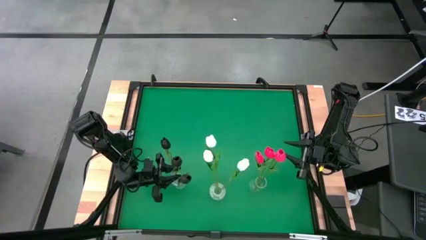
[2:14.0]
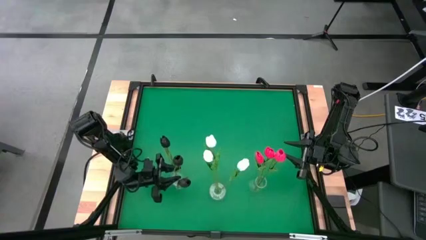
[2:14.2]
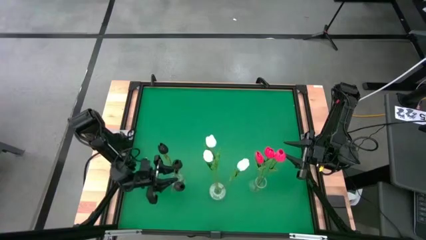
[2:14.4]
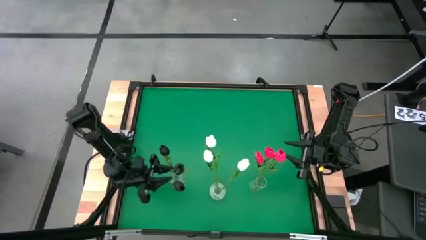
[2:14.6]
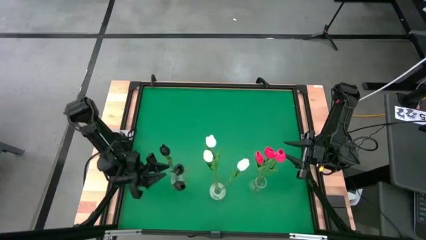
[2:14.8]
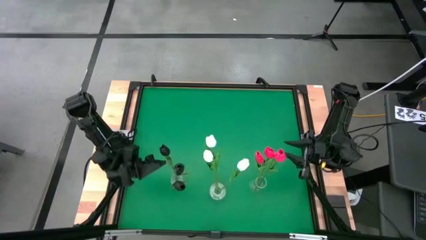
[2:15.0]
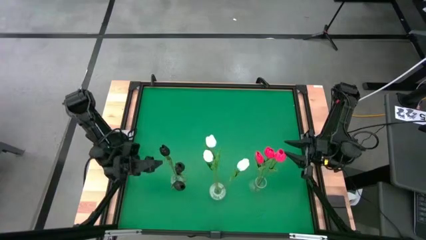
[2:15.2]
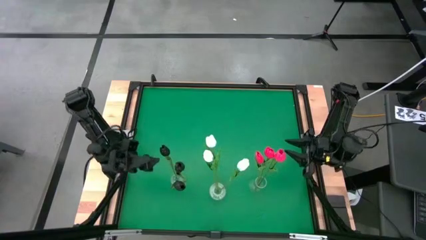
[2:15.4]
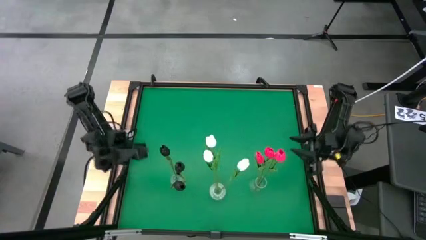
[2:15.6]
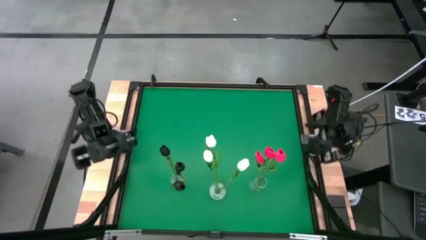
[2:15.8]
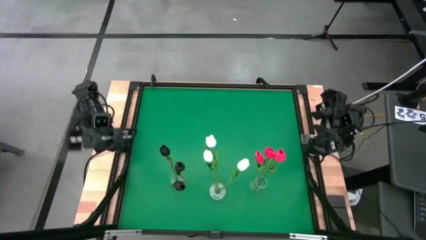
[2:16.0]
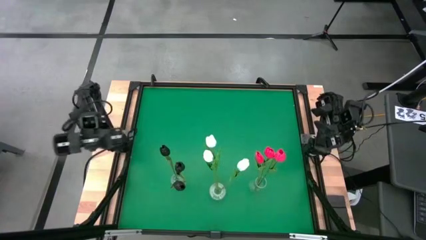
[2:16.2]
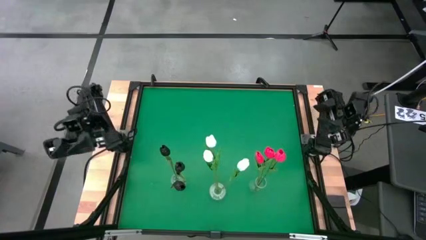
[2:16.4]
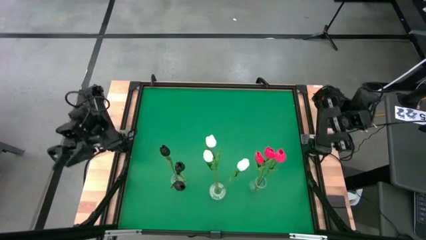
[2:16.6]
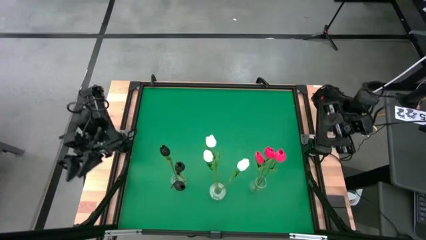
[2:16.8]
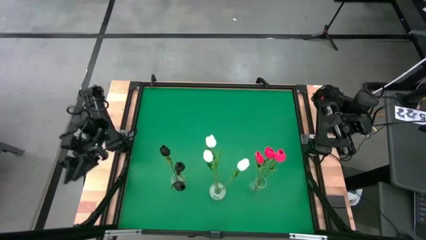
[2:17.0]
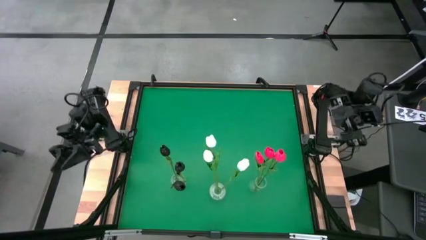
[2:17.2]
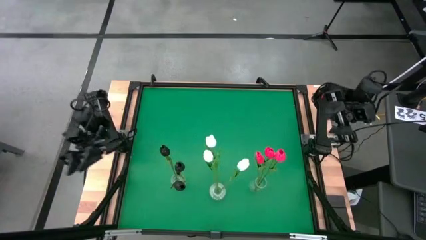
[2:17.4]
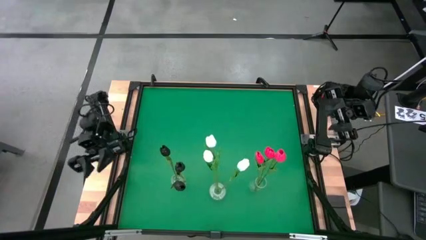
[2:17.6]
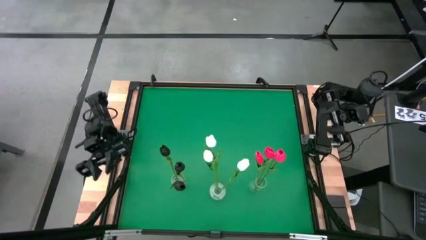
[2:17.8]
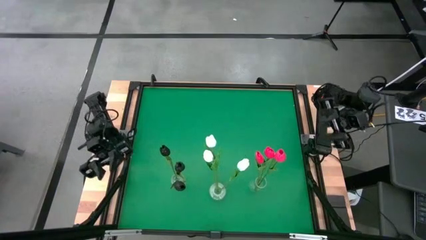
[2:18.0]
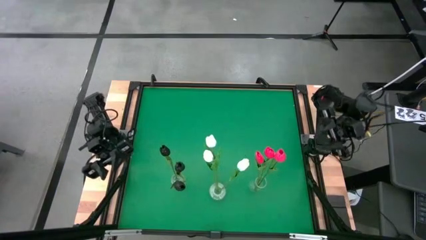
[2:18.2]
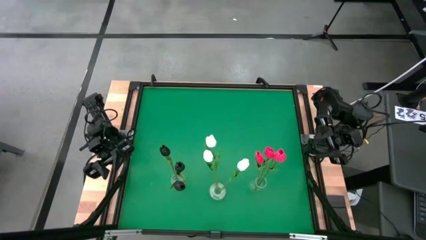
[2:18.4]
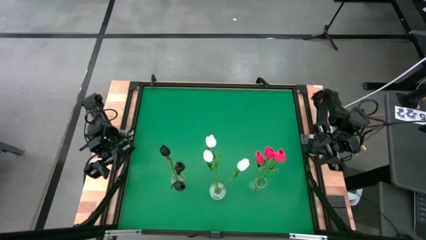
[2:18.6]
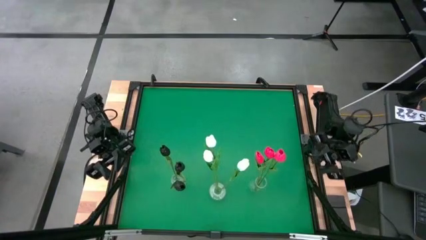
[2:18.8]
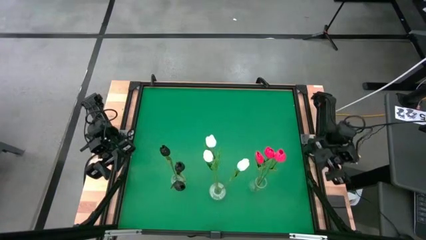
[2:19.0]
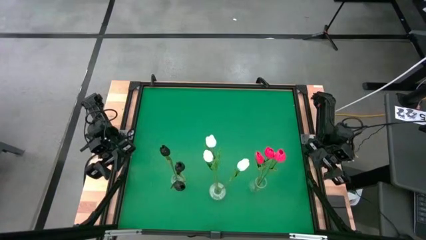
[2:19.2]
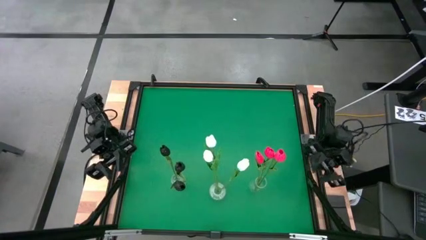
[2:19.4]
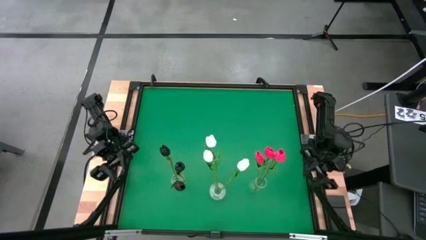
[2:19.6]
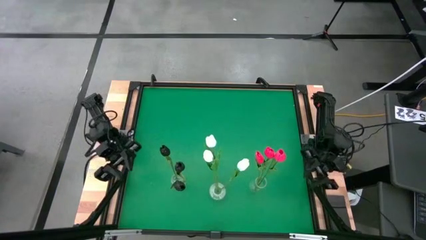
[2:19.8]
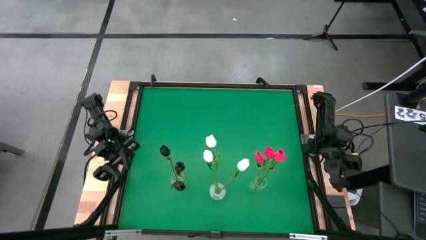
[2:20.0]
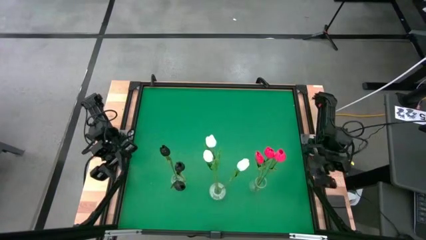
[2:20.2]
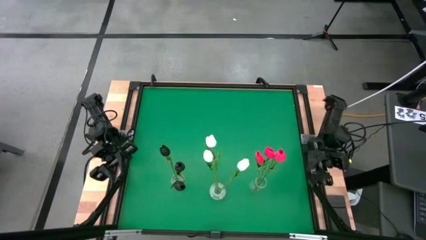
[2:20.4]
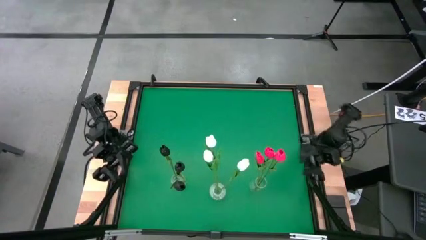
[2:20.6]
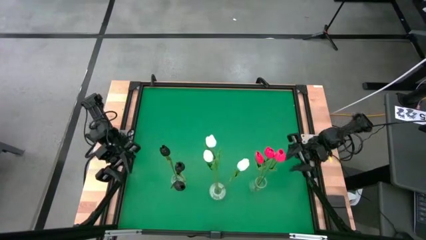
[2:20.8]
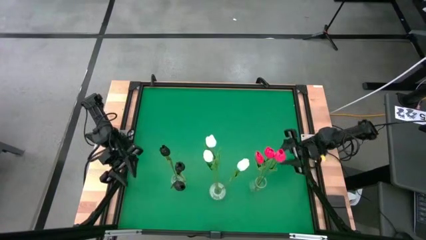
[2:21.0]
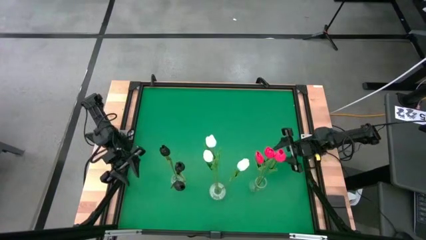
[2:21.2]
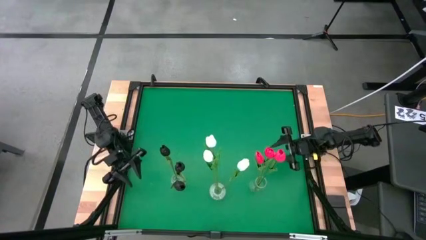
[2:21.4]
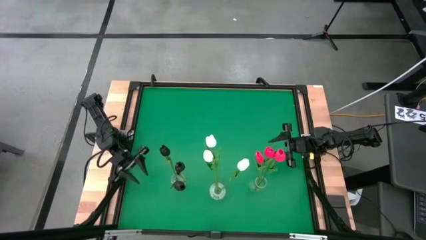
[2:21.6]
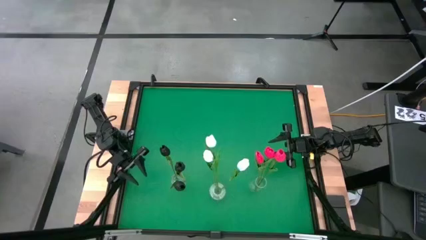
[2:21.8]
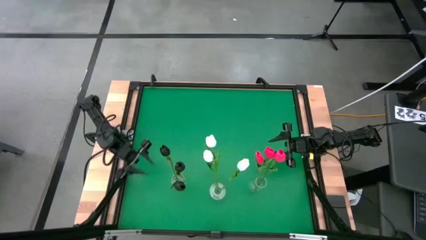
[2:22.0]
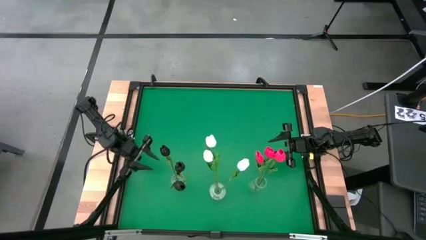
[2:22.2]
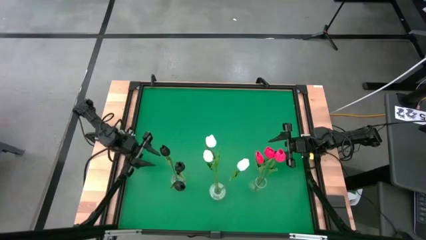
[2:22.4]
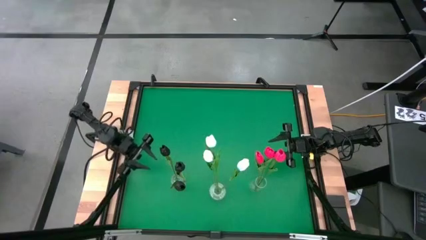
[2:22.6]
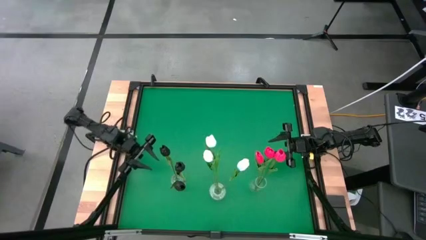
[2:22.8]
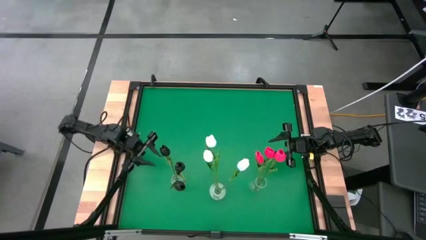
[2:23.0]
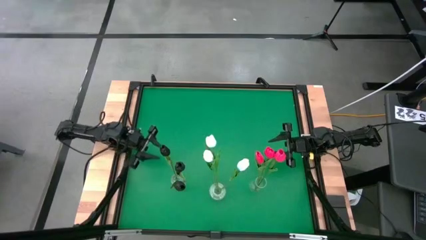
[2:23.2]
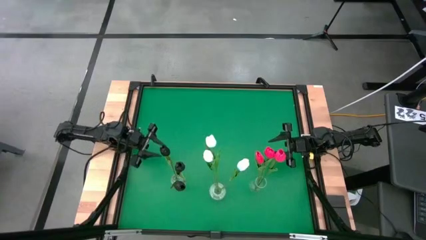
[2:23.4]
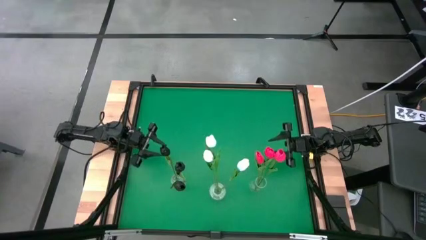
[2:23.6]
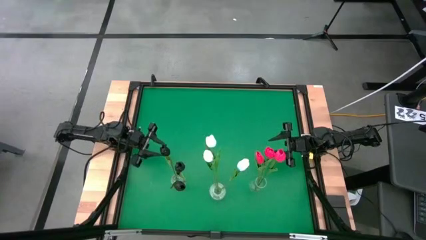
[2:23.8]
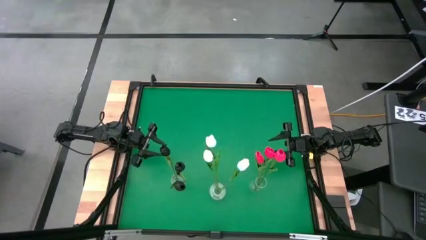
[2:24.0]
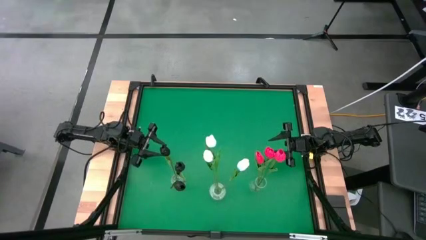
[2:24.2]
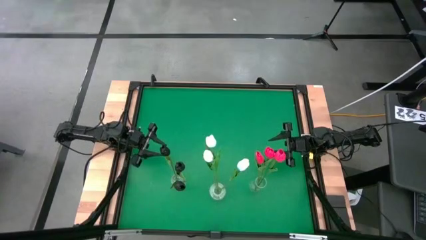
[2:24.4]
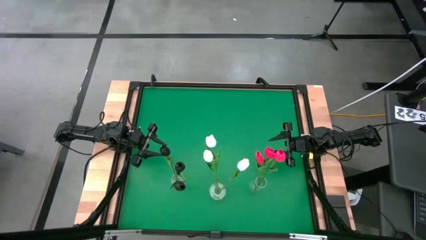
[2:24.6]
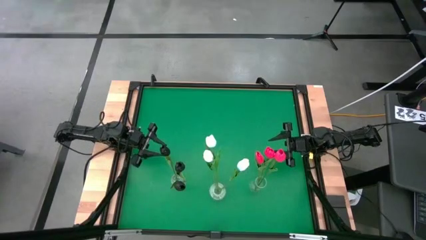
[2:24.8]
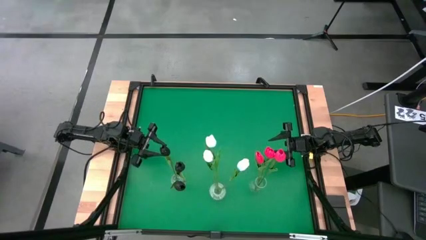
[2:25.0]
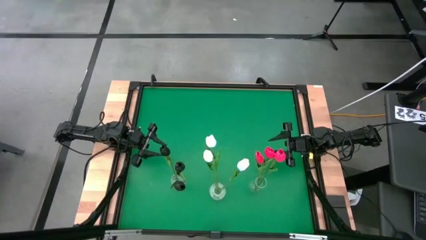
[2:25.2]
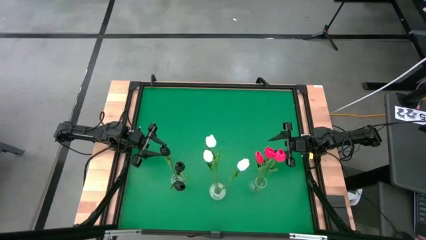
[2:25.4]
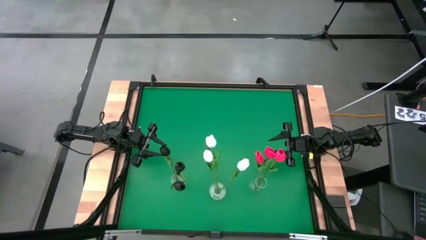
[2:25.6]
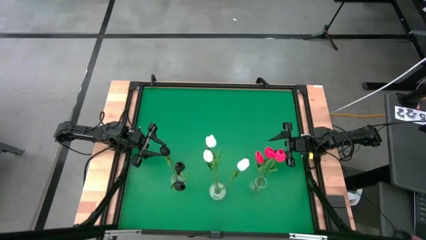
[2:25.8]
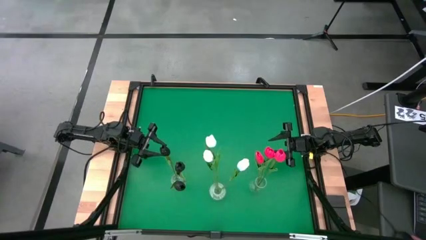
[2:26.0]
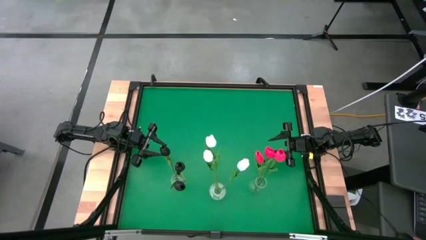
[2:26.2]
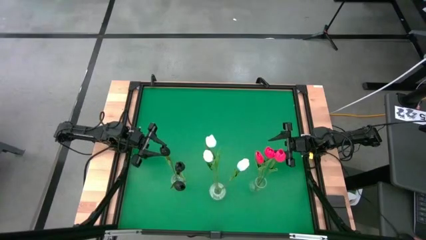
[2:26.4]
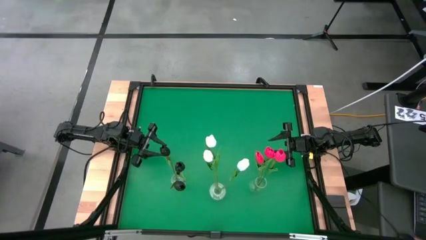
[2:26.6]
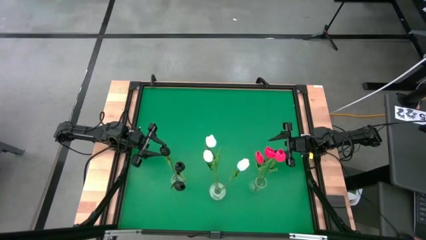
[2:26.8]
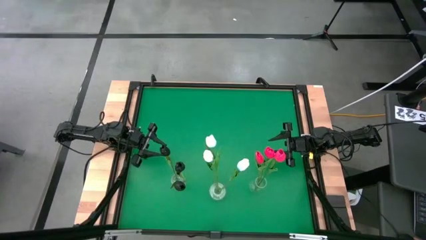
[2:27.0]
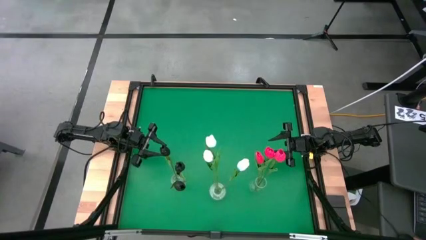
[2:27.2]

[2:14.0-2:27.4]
Task: Sort flowers into vase by color
Return to Home Position

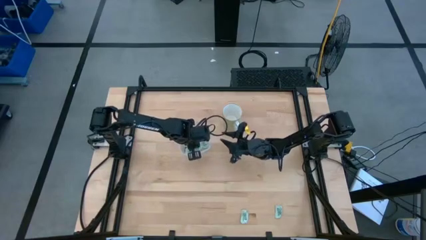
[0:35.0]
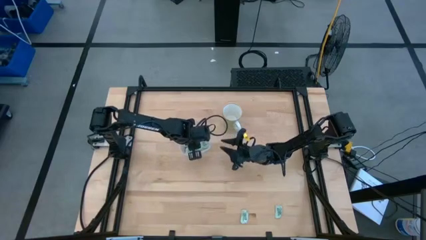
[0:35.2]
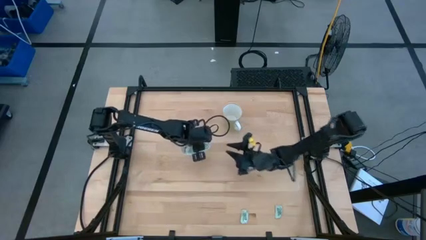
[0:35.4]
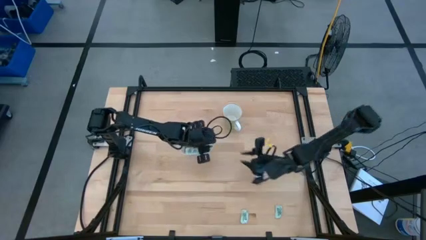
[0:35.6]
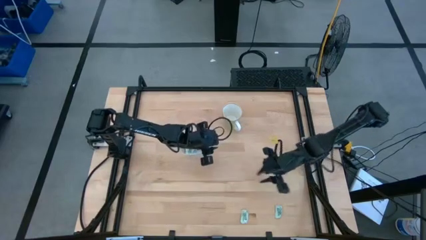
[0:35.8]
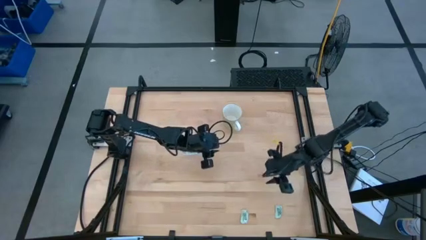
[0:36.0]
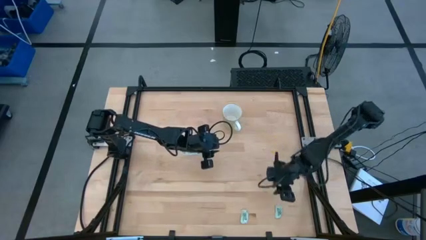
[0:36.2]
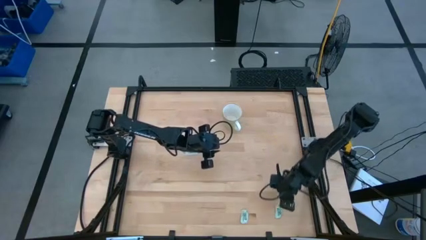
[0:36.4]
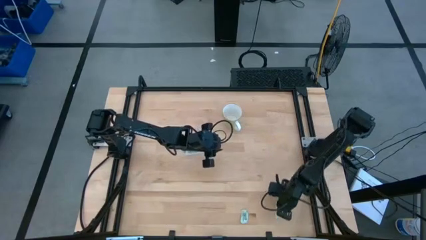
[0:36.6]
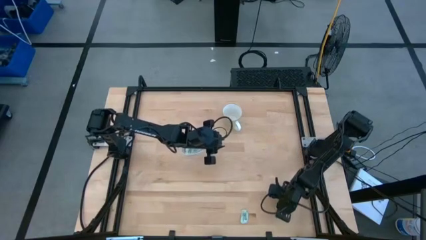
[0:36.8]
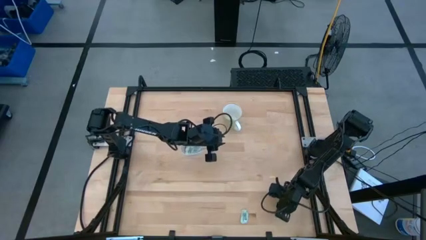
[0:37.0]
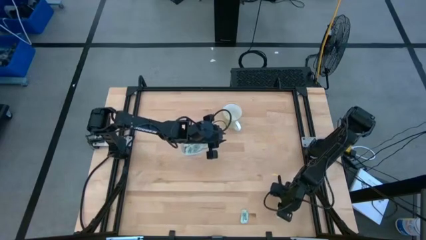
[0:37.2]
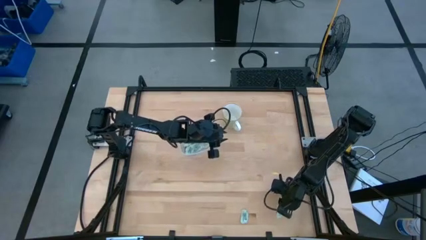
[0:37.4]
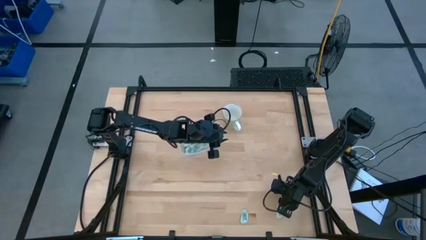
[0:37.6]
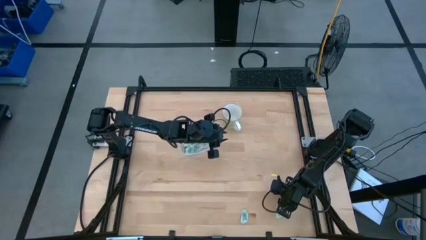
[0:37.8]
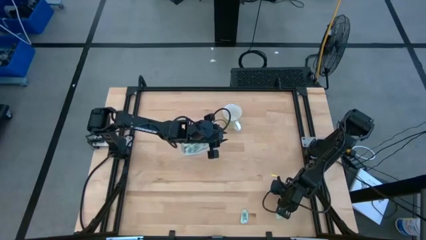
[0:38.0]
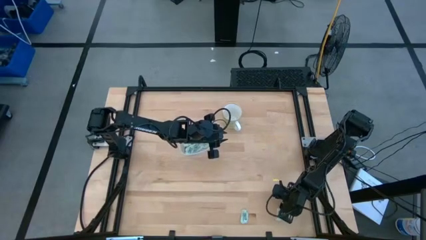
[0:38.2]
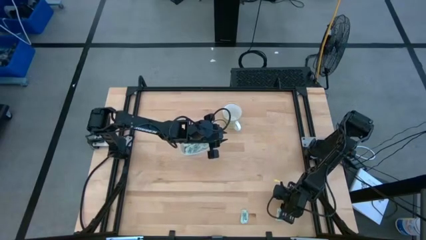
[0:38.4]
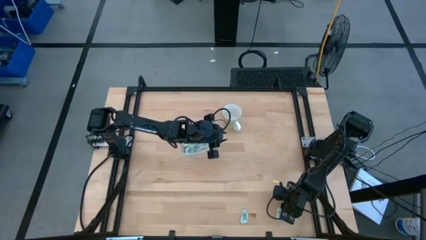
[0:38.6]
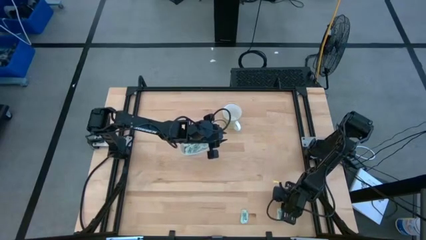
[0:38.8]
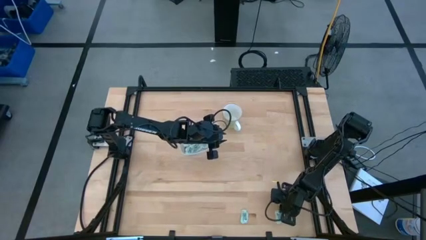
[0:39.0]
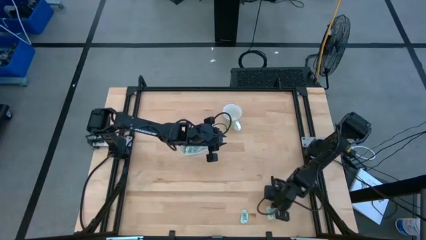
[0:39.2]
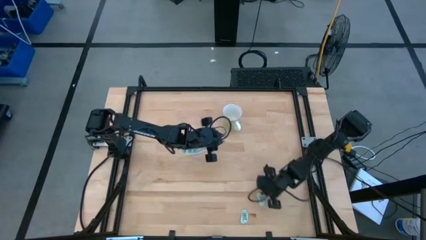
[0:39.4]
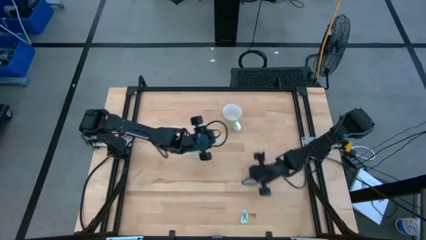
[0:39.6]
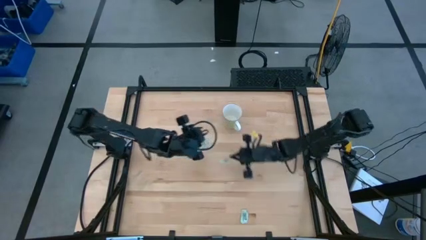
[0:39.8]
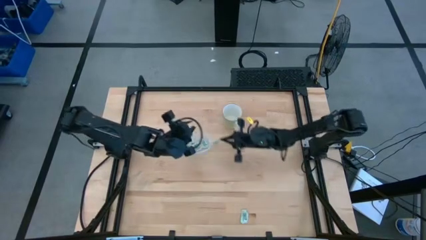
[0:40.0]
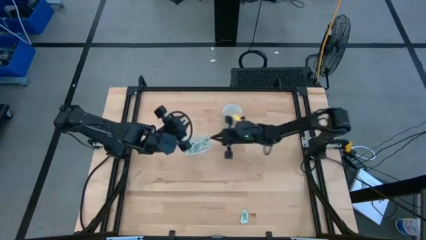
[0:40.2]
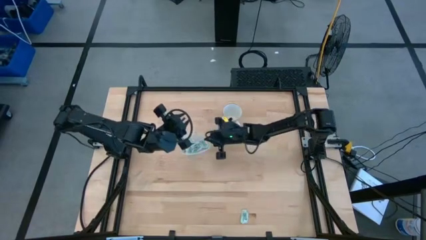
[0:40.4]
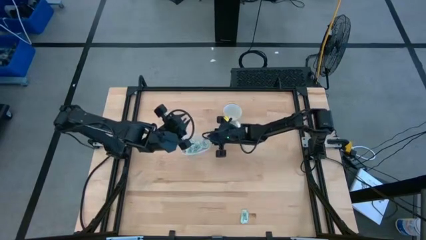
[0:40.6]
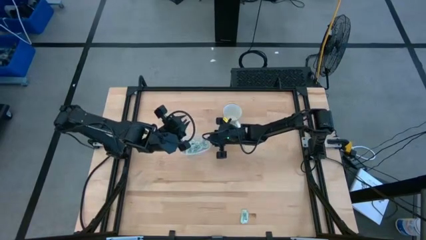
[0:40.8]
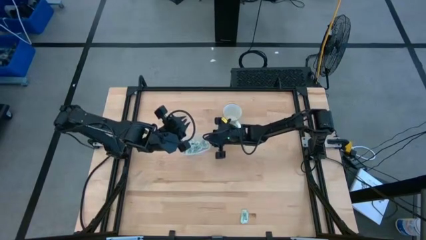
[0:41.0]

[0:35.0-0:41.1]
Task: Pick and place Stevia / Truvia into bins
Put the white stevia packet into the bin
